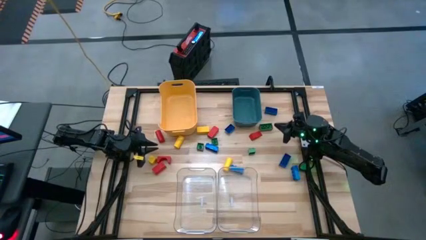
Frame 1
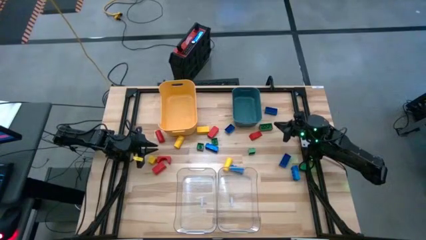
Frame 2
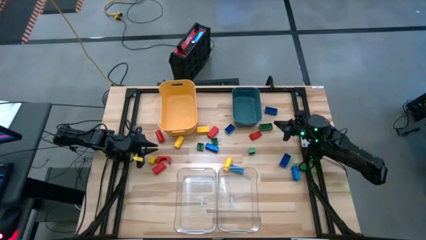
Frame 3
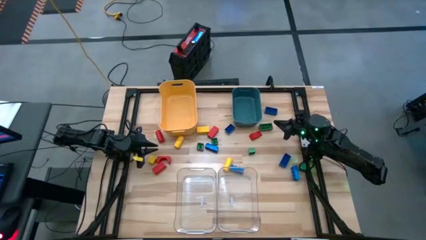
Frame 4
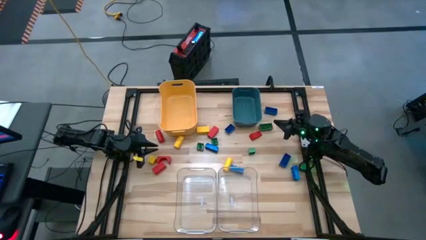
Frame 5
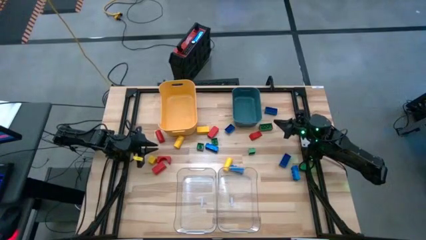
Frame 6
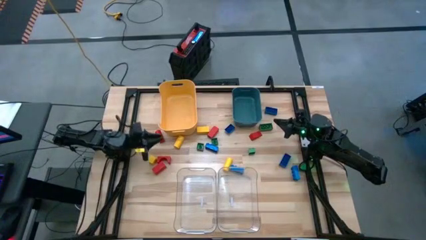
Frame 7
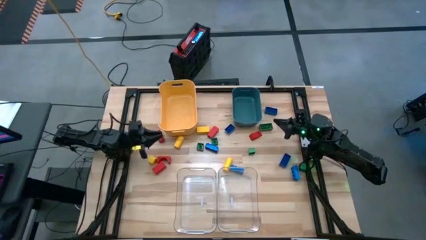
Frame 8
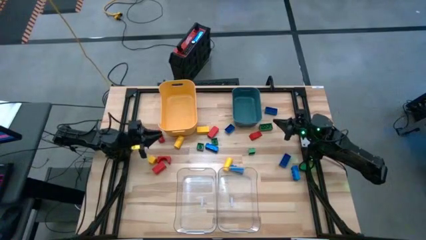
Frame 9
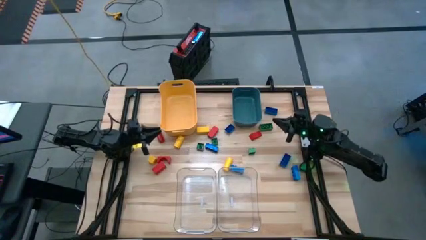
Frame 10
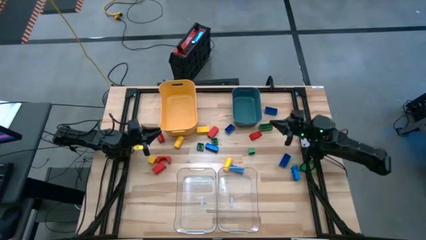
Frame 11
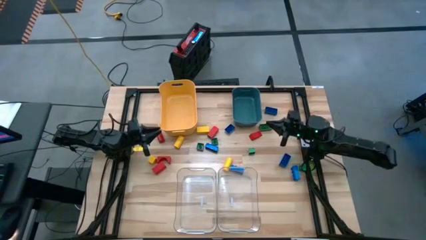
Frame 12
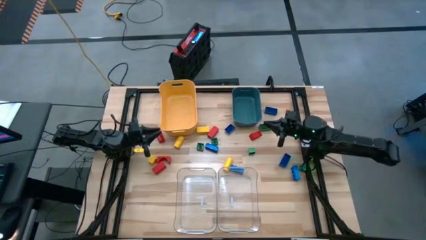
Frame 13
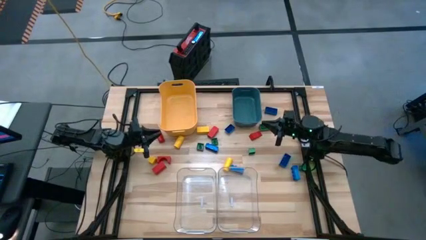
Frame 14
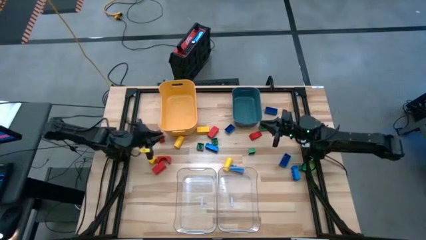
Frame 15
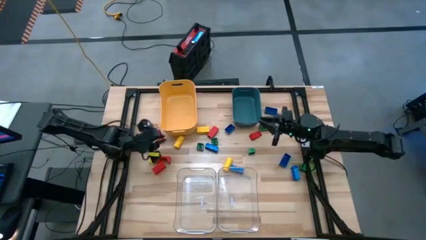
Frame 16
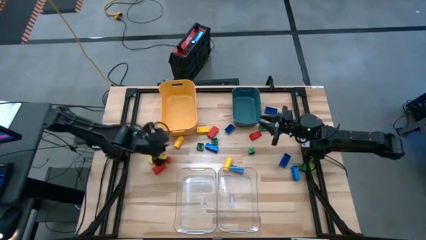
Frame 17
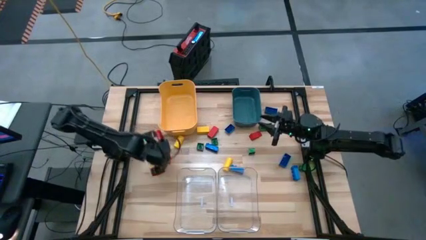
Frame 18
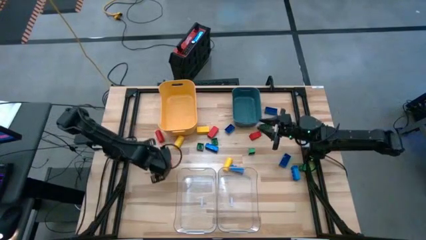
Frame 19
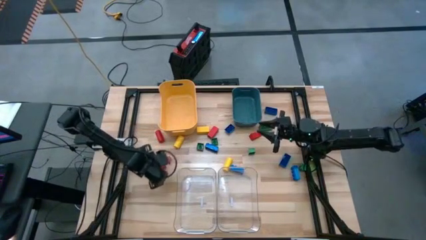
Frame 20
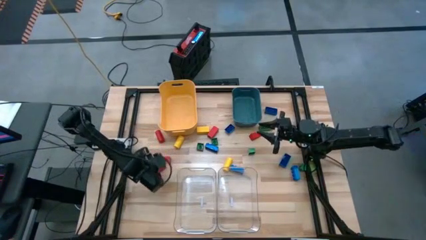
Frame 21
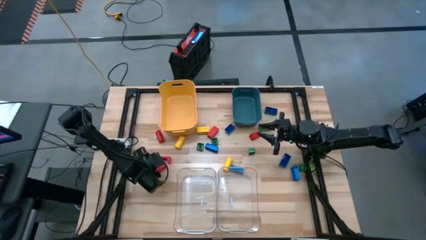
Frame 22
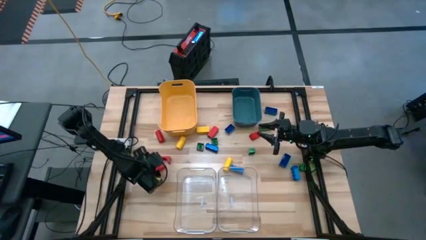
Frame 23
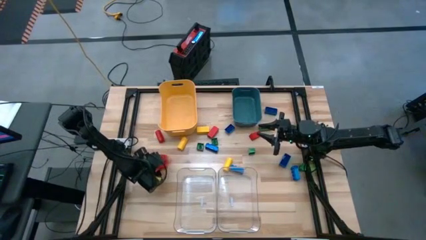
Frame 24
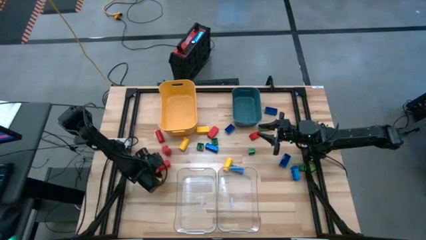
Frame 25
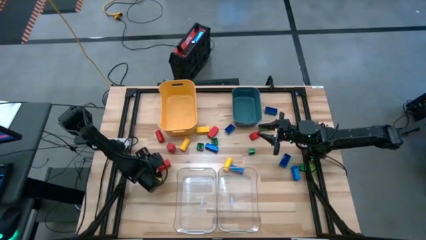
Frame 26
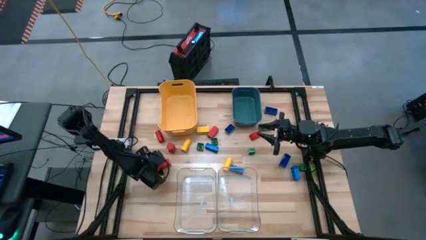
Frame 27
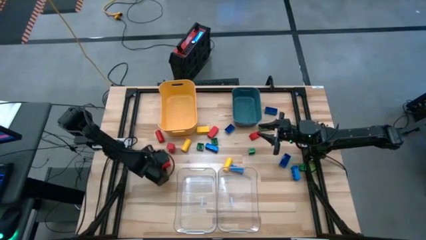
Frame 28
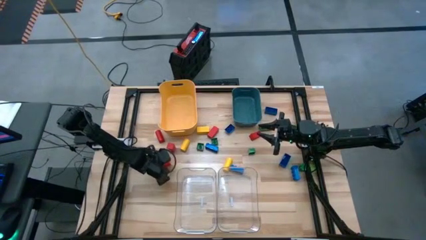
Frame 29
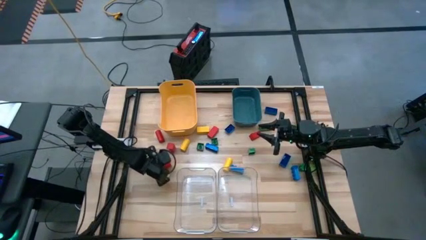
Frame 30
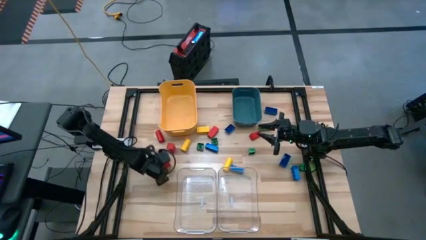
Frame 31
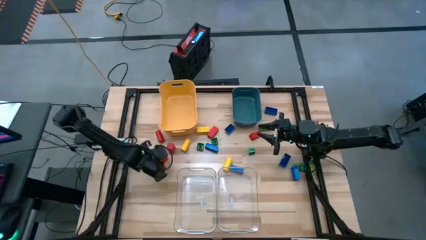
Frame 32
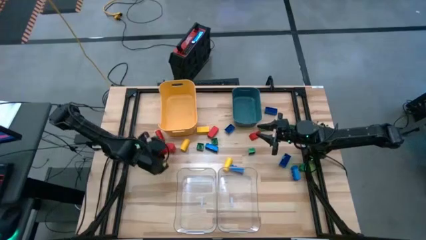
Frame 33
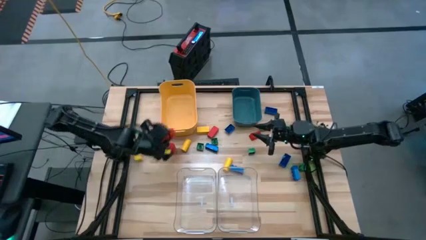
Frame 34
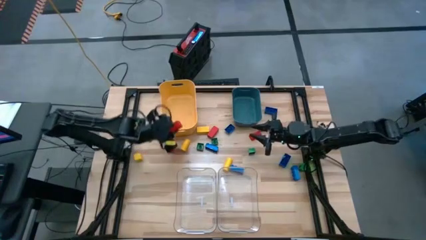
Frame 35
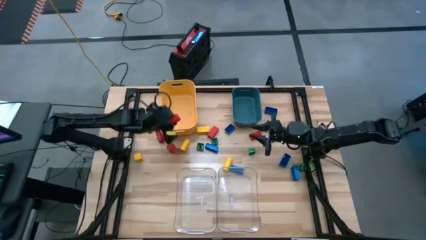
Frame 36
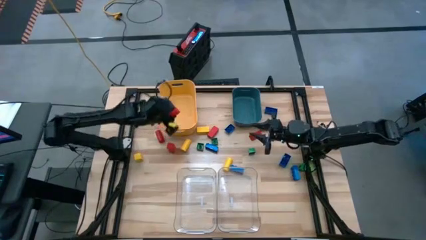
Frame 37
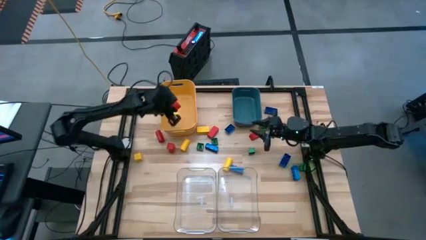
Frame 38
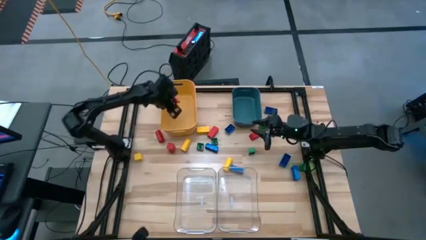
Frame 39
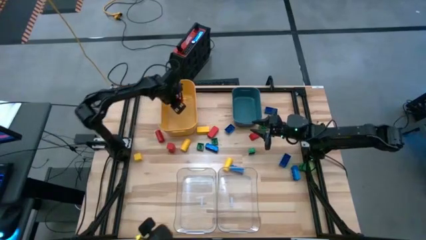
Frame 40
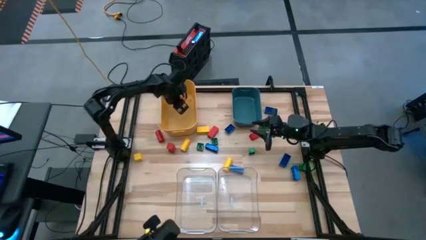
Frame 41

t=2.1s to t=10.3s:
Task: Sort blocks
Put the red block into the yellow bin

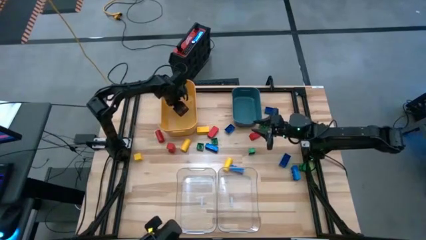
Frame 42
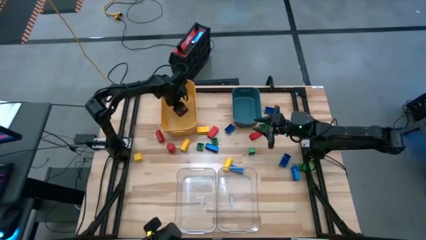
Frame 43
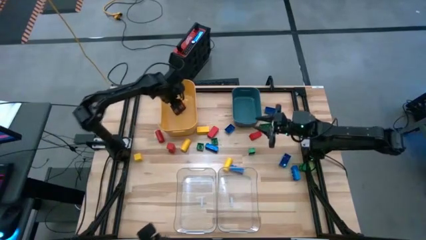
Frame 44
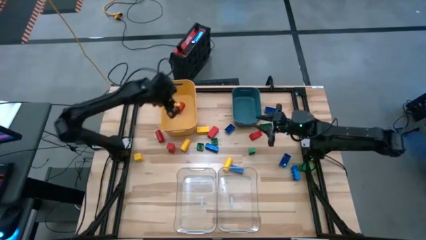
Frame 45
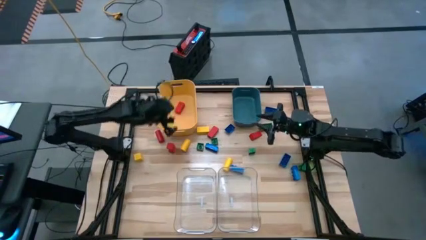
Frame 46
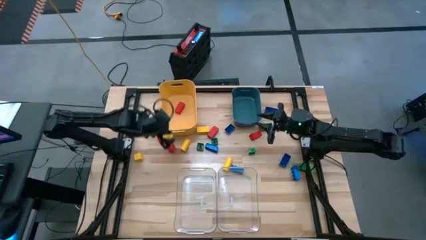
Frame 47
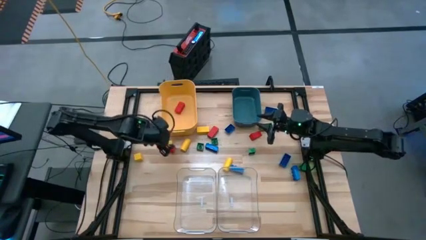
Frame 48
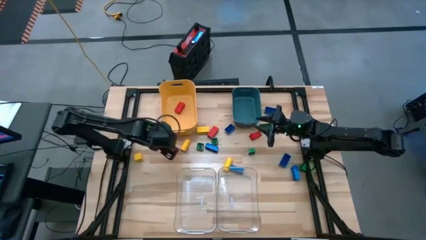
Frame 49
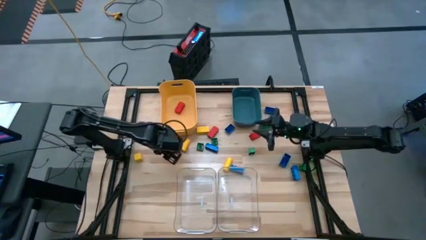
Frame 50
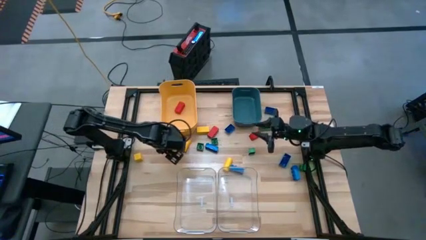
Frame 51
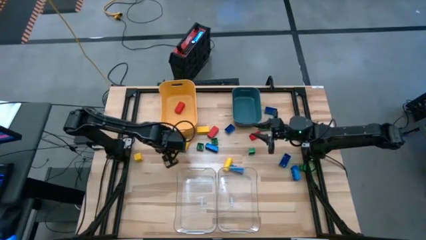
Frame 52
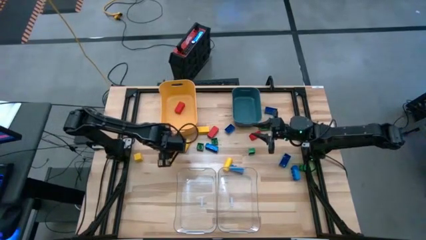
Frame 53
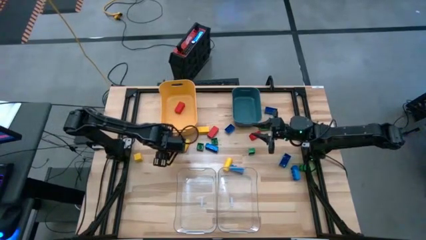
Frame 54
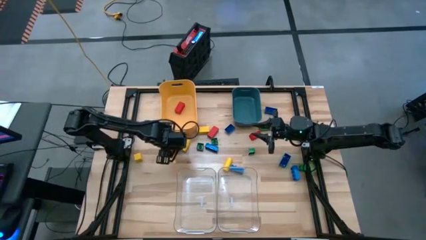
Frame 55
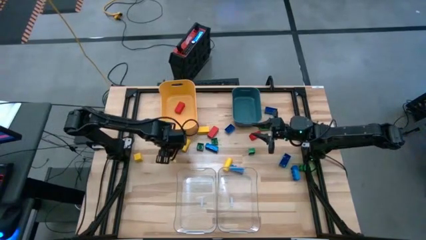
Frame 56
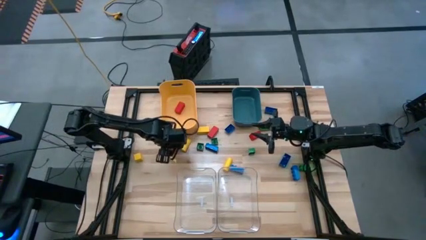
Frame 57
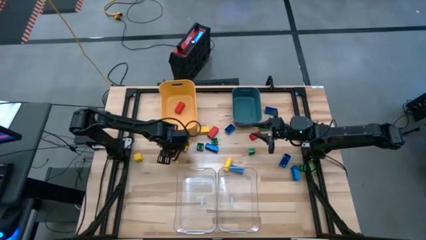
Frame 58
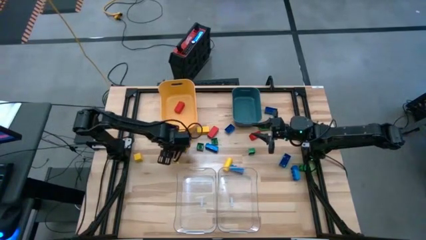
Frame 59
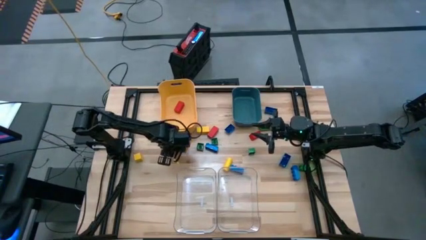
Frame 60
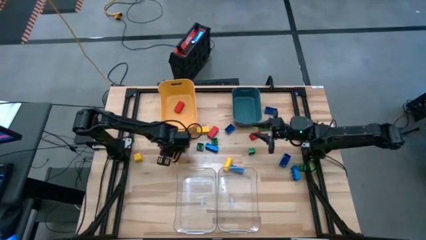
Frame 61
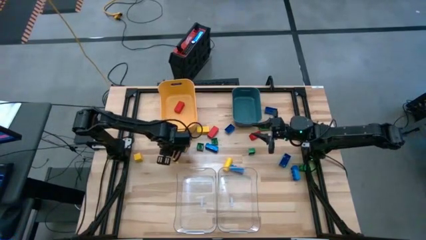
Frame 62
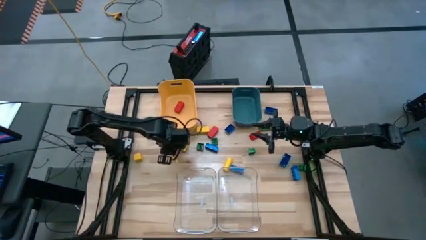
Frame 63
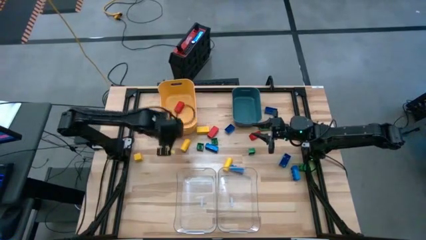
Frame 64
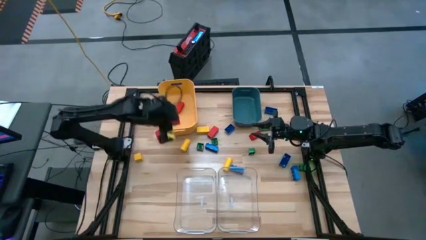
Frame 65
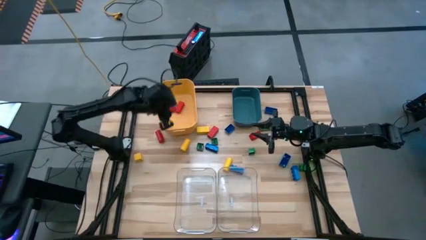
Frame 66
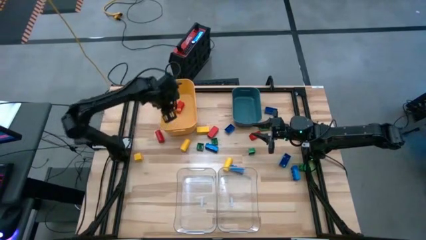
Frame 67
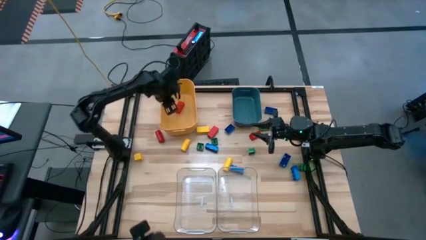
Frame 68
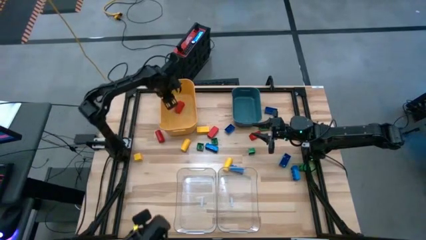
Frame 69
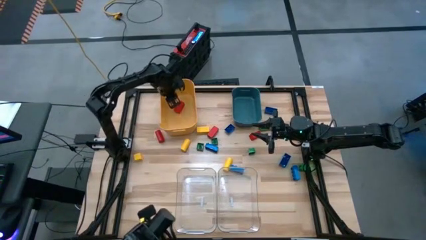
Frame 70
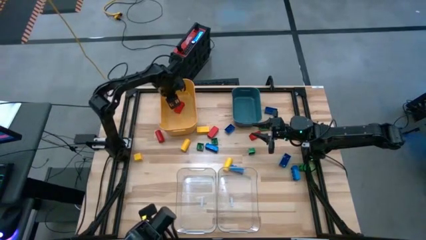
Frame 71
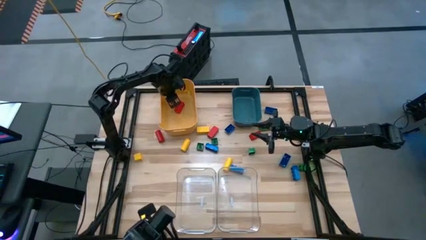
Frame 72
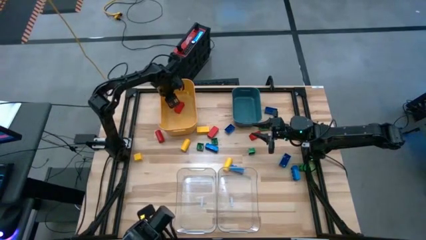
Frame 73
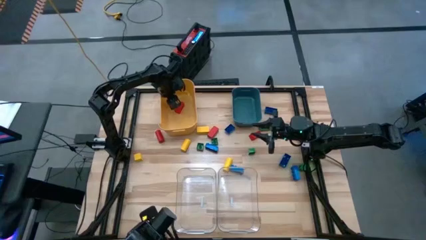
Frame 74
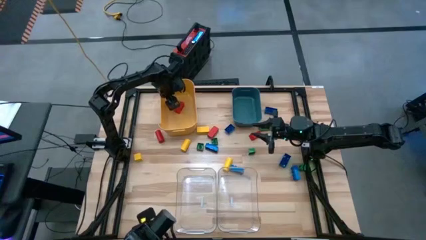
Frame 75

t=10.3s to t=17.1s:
Put the red block into the yellow bin

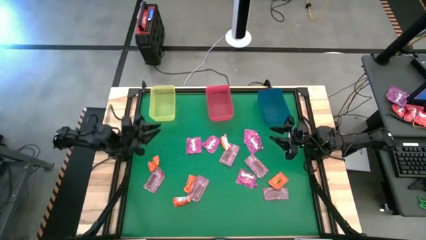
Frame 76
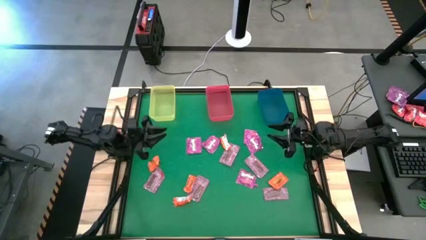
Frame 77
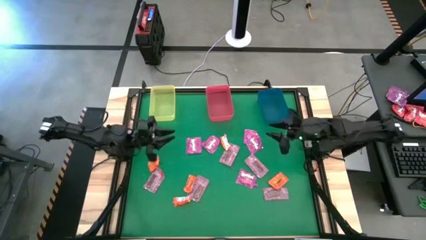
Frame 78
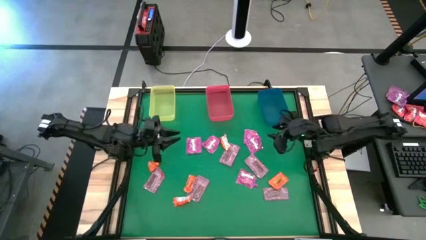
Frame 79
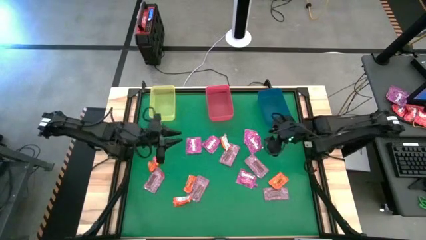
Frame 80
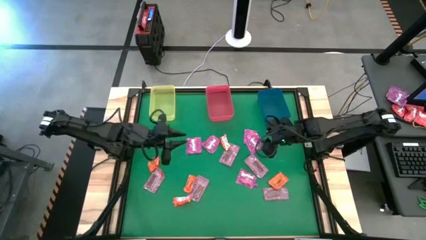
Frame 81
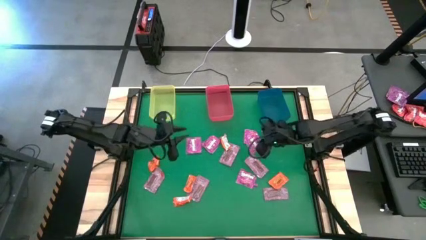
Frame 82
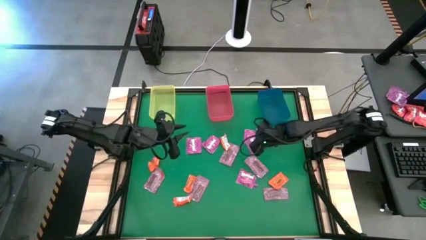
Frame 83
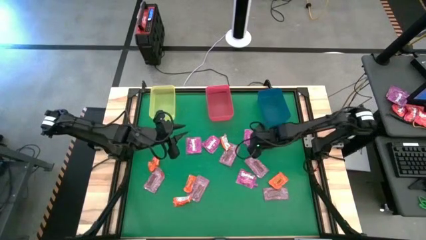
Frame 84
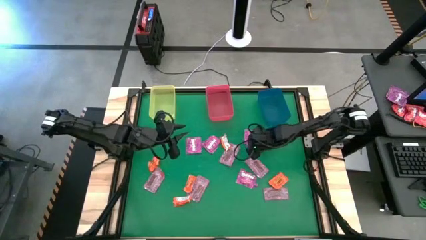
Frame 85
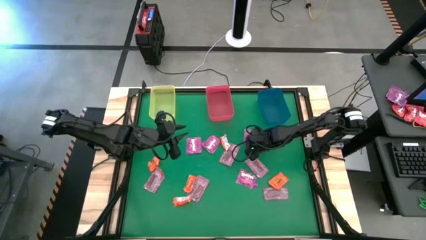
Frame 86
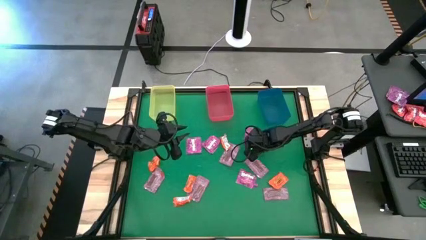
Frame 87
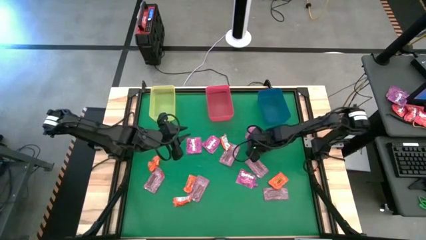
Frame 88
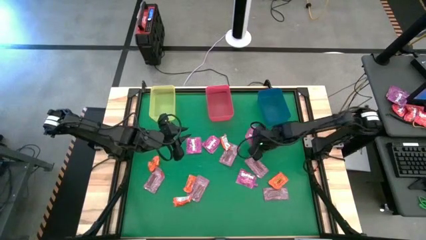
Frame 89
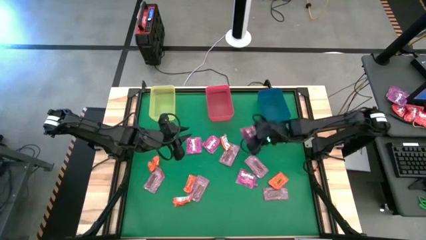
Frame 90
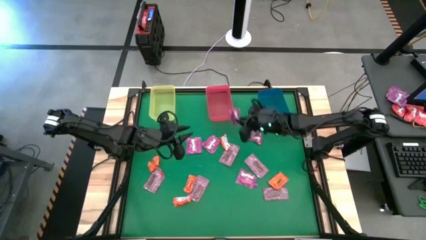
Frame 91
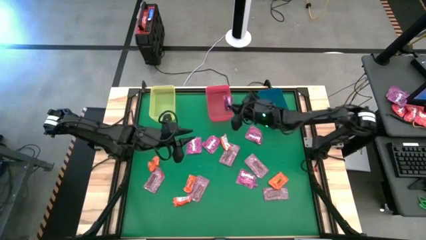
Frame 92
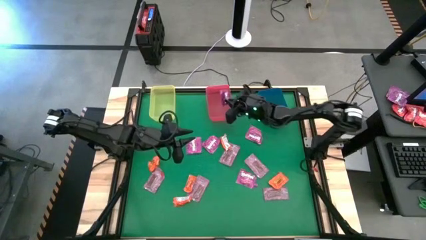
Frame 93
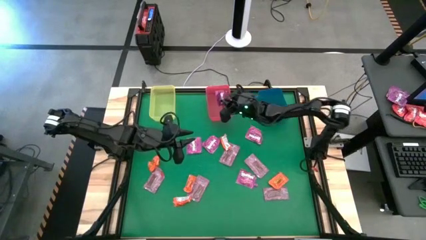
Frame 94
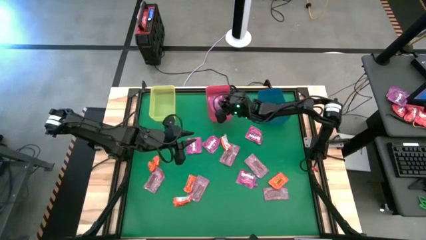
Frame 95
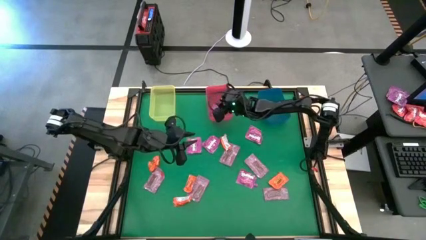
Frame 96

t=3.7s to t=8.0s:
Task: Sort candy by brand, put in halloween buckets
Put the violet candy into the pink bin
